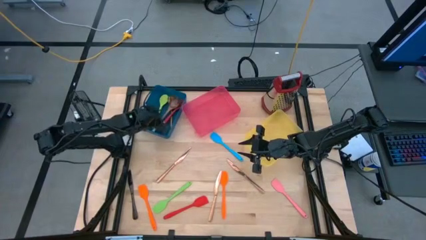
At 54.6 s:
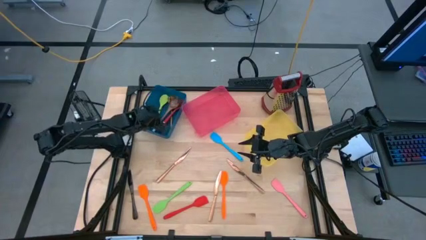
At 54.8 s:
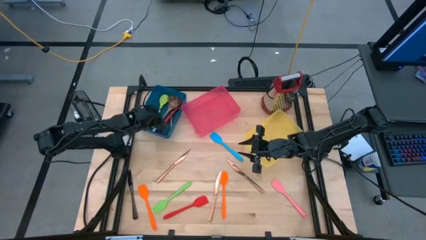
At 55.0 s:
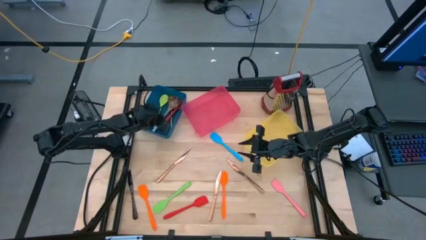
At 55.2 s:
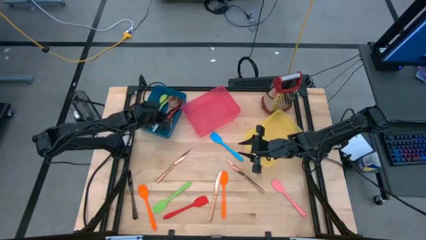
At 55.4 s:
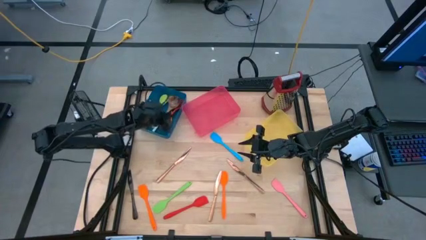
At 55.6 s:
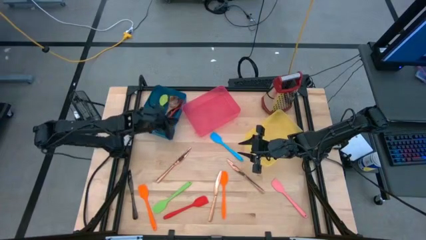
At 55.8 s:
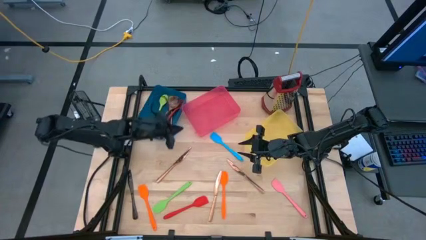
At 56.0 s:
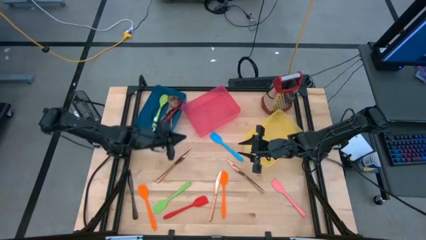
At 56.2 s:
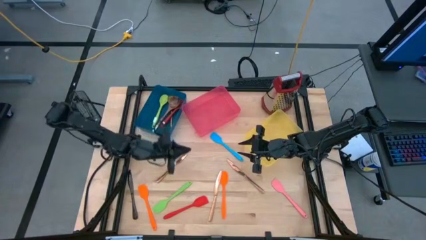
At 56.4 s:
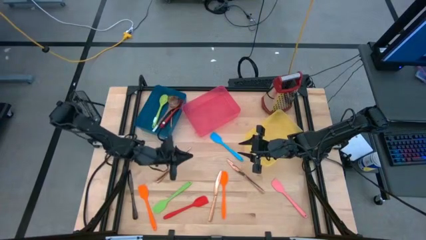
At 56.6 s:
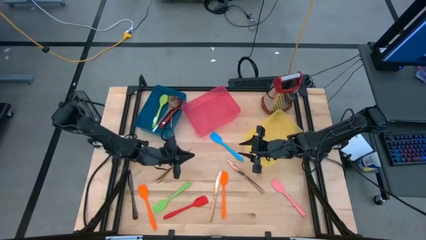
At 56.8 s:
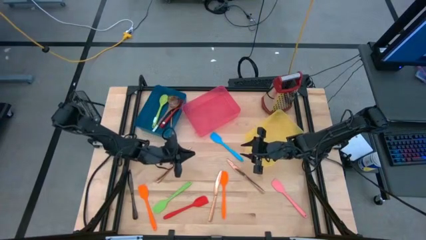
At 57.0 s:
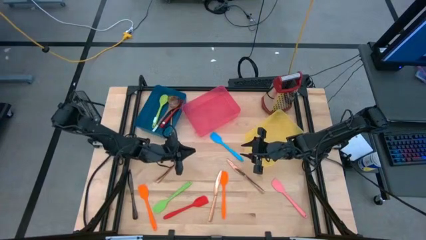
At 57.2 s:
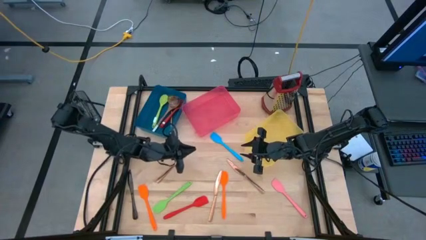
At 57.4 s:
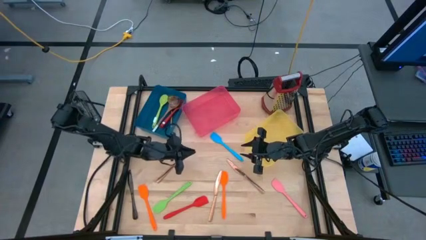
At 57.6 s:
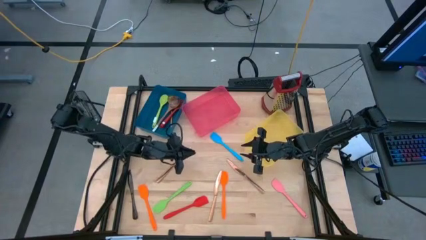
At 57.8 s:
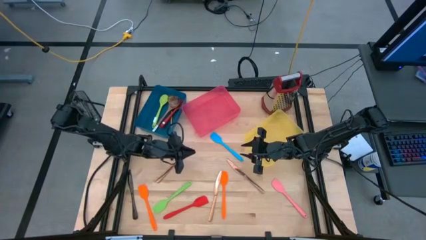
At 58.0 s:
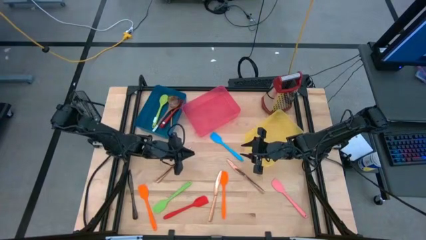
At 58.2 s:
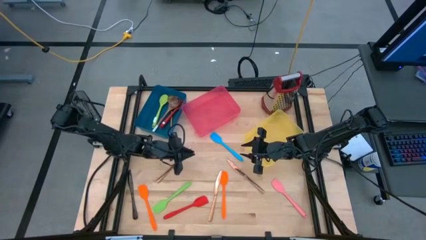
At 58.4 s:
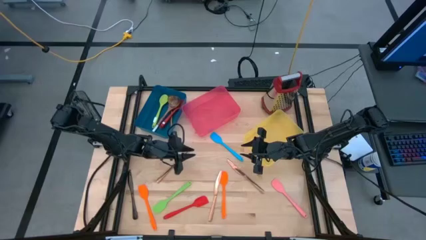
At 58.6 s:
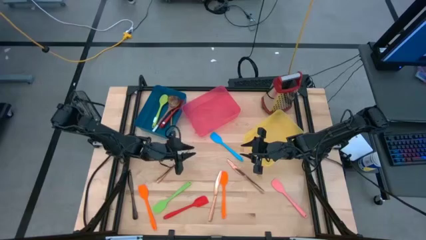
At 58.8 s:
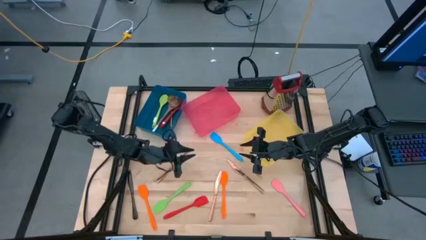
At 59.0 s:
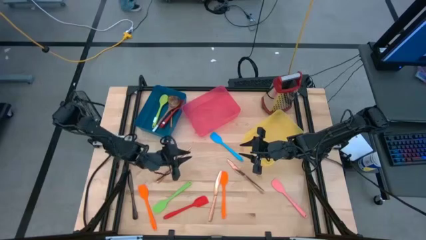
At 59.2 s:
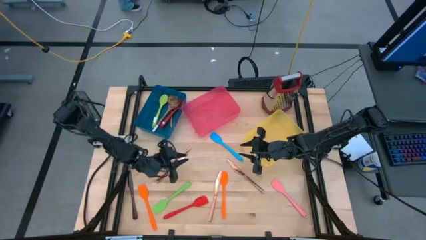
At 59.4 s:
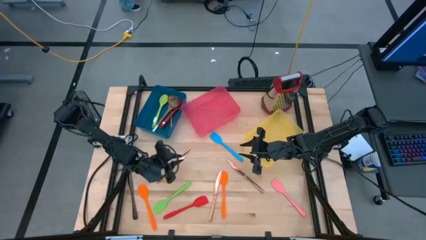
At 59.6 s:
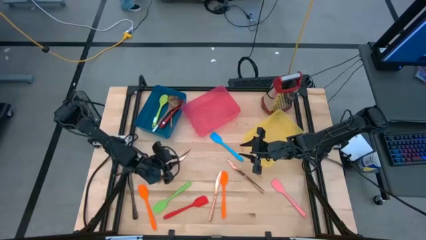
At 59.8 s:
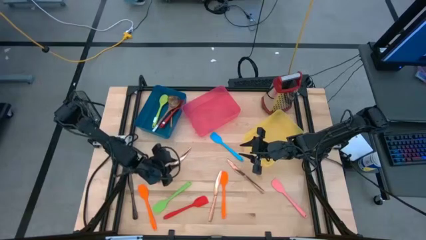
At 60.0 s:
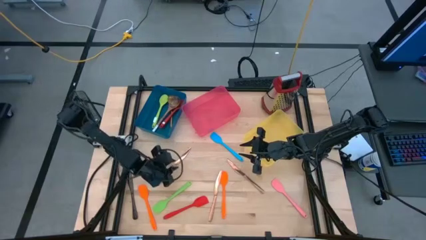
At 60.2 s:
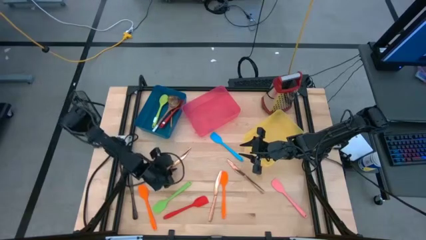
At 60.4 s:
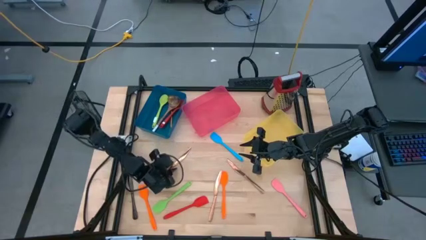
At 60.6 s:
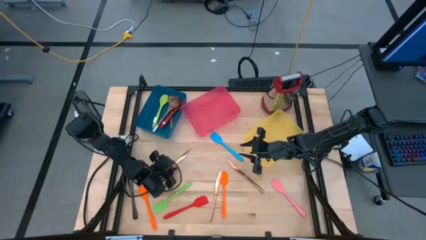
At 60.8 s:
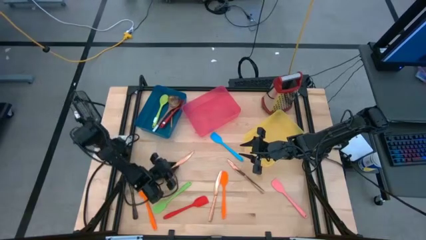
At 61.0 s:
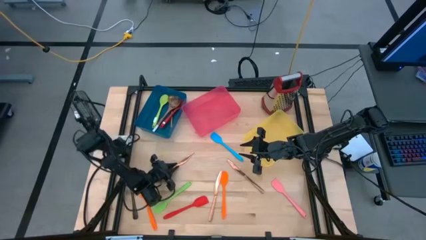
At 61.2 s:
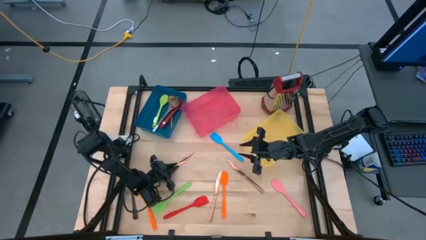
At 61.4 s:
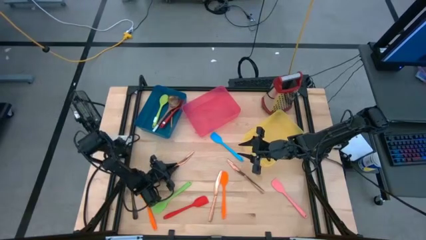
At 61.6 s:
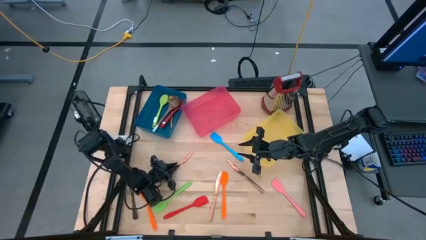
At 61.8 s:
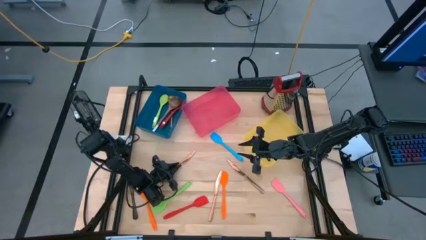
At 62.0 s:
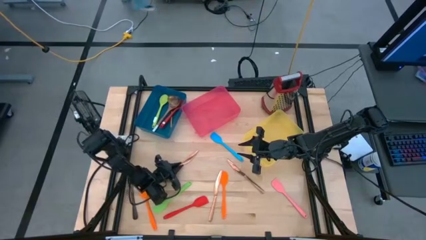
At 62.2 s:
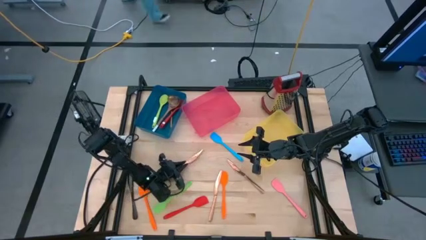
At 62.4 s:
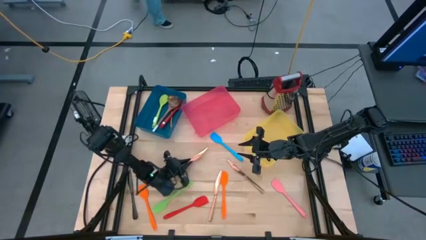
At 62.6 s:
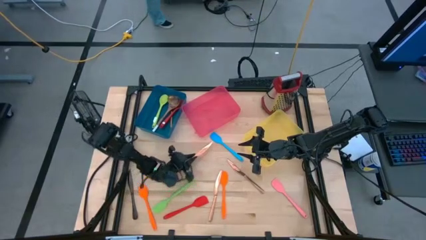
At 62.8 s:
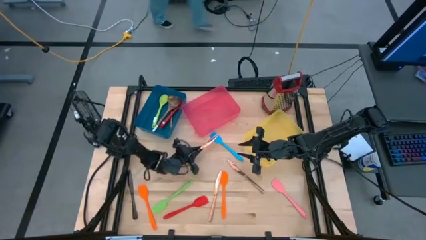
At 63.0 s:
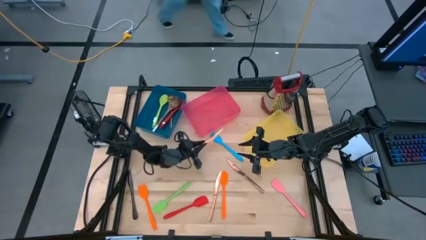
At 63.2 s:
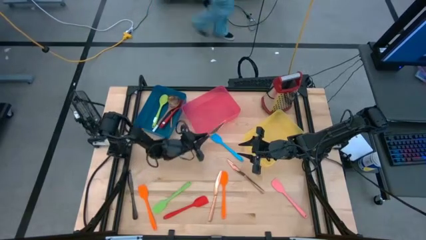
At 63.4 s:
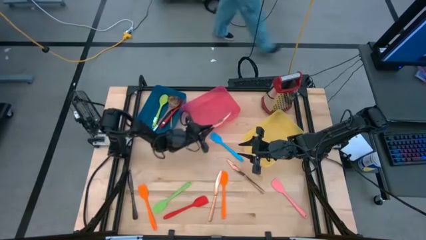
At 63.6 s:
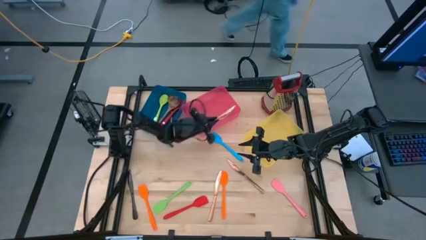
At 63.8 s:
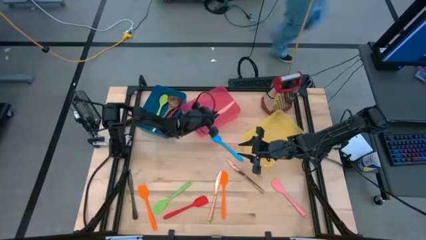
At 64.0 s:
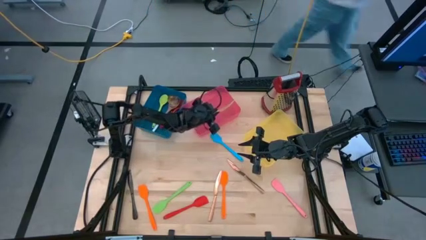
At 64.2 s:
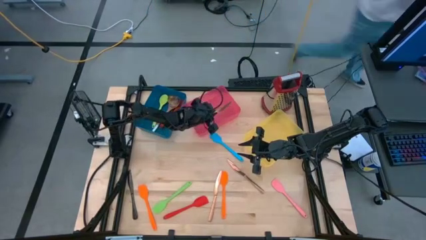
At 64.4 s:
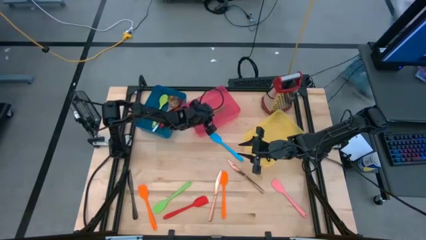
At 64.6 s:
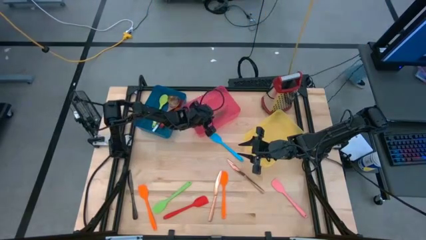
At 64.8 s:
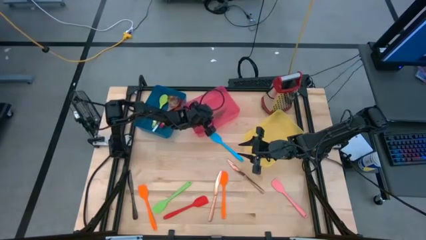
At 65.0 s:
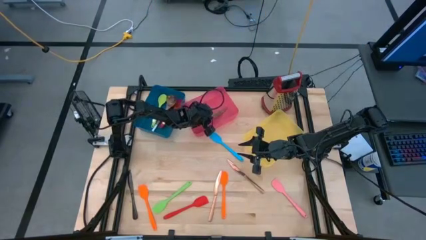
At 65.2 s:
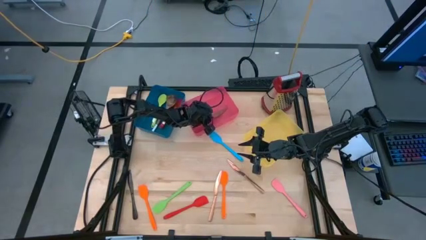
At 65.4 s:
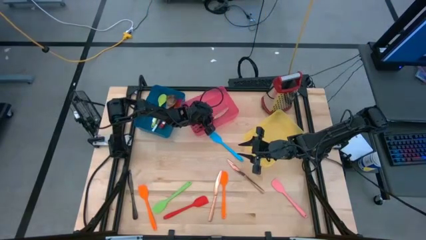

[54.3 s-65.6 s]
Task: Pick & Place Kitchen Items
Put the left gold knife into the pink bin

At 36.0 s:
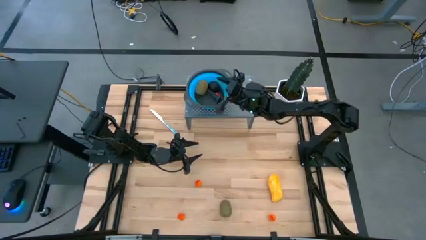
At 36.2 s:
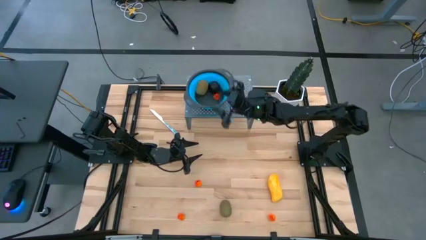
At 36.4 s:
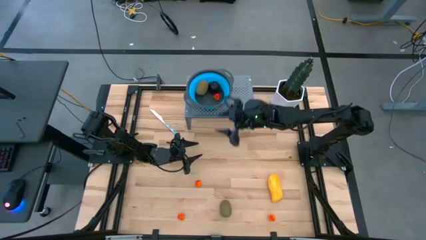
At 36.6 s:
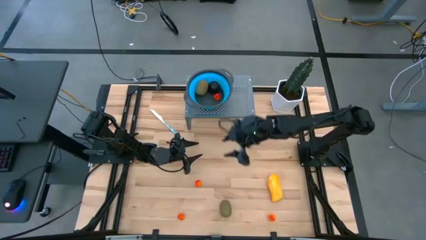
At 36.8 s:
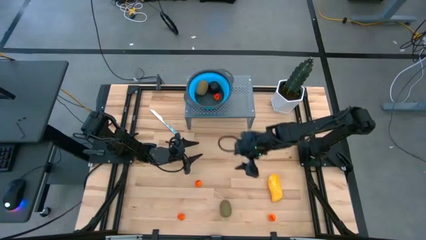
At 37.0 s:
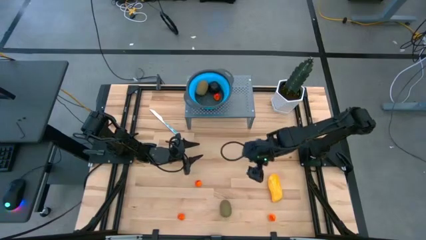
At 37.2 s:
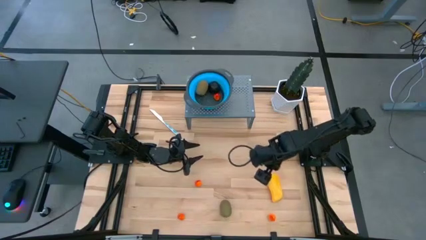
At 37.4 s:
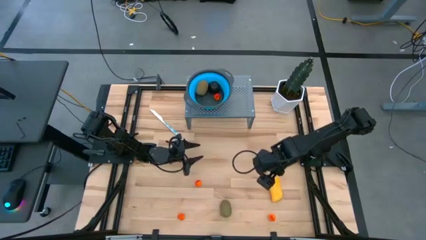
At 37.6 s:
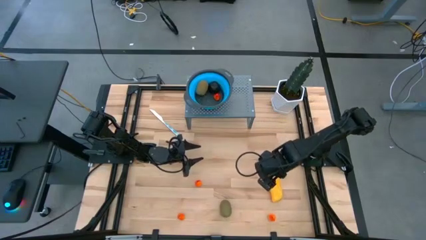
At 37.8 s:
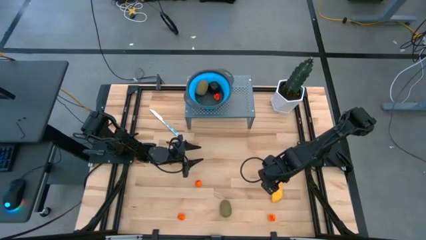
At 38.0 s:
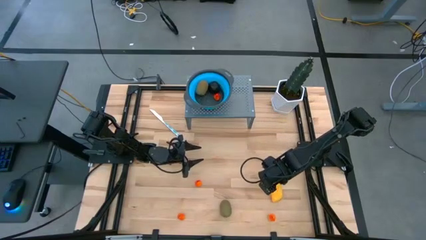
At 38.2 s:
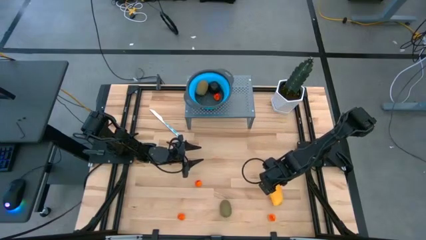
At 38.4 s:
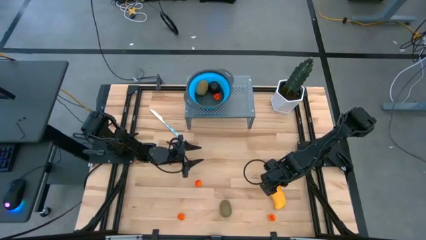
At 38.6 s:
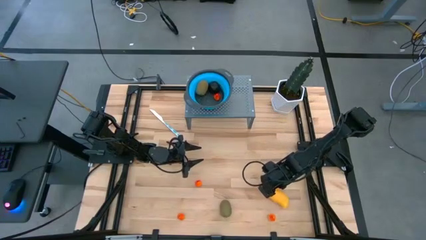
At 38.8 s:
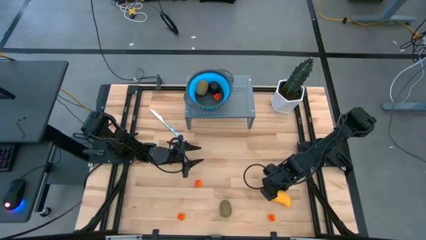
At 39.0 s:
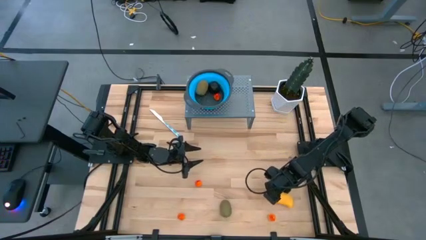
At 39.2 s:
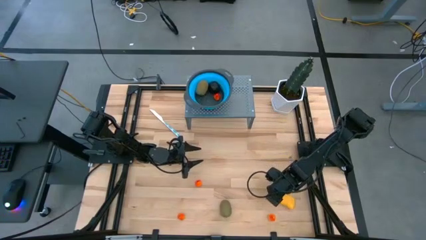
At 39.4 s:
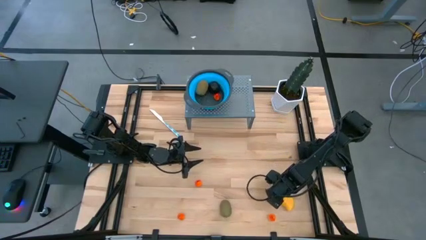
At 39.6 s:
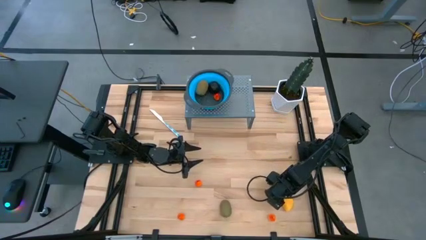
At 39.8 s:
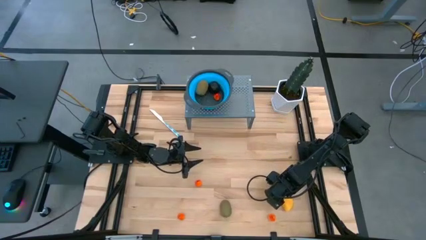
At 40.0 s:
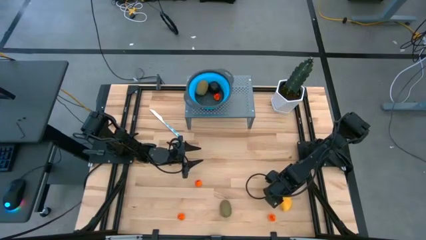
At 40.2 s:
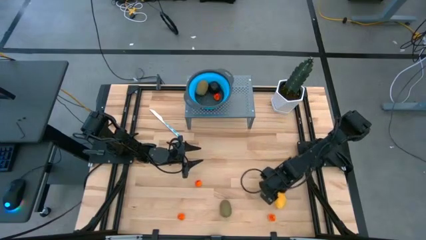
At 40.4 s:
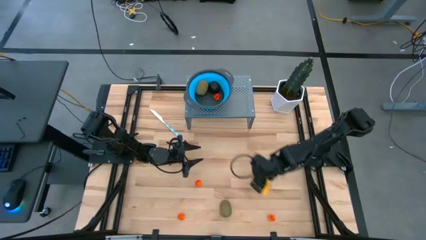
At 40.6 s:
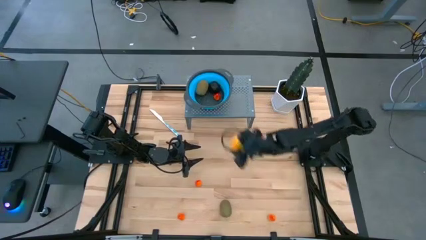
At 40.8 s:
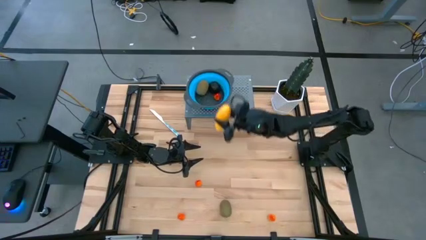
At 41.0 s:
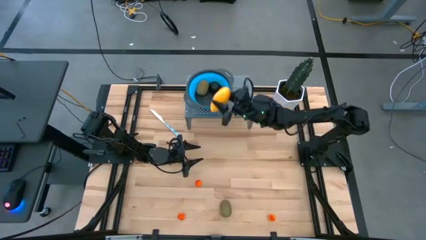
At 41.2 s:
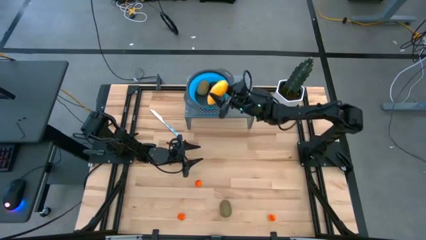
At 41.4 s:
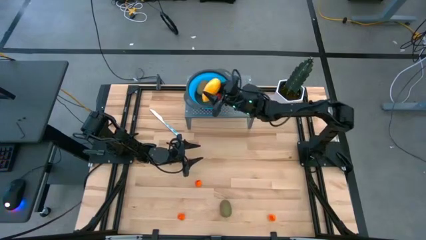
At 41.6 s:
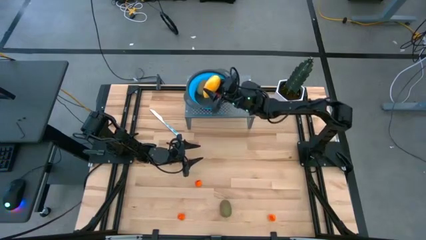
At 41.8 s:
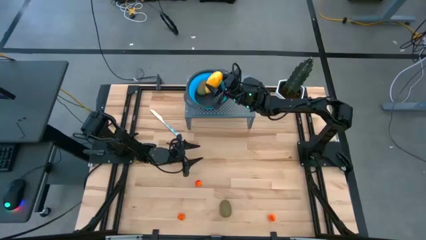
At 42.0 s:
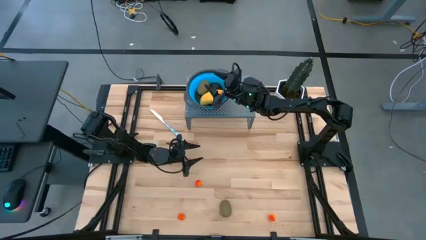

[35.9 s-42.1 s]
Task: Pick & Place Fruit
Put the yellow mango into the blue strainer bowl
